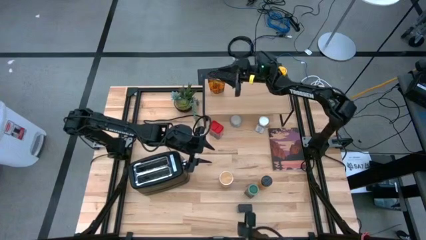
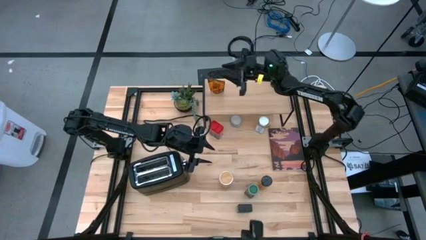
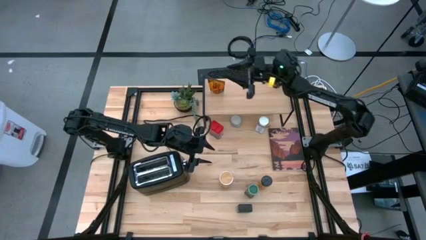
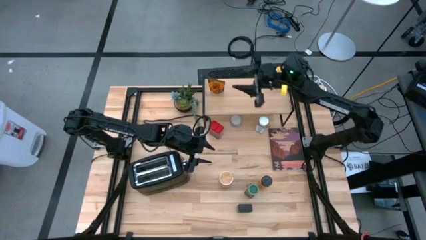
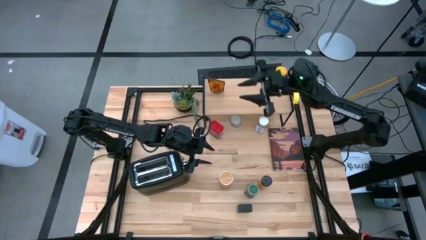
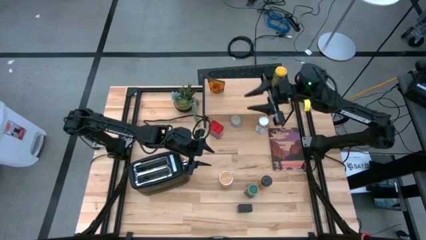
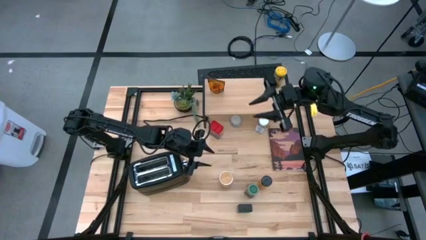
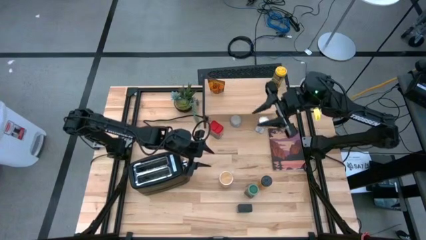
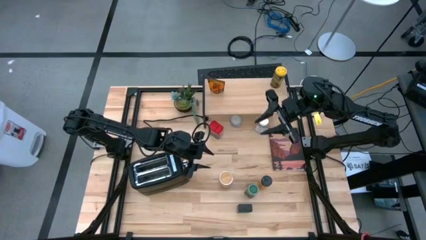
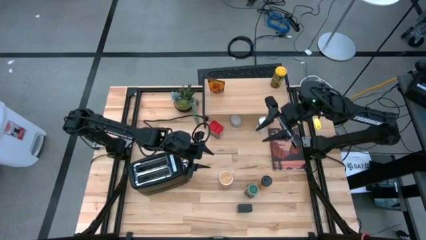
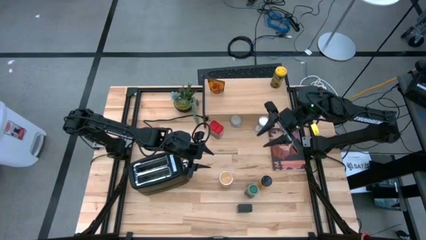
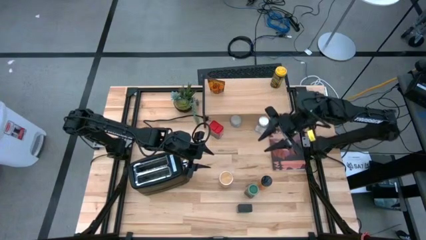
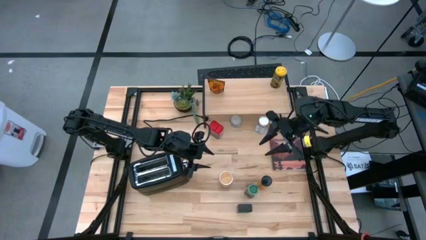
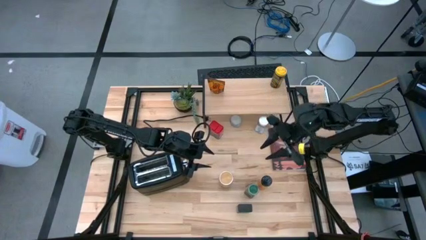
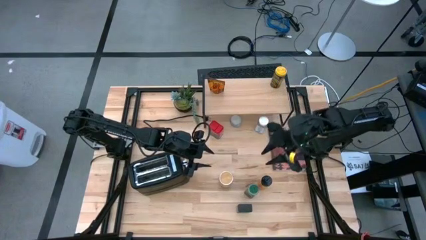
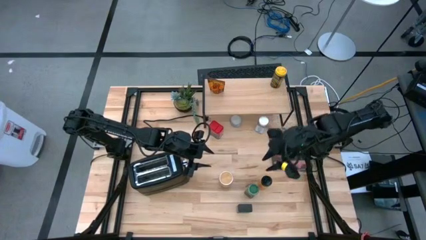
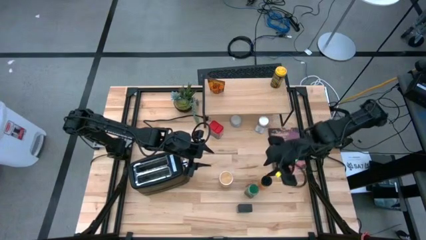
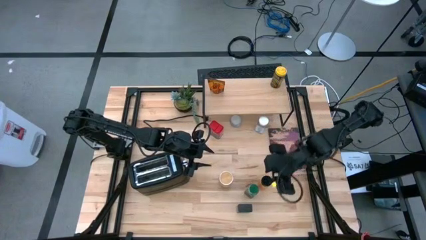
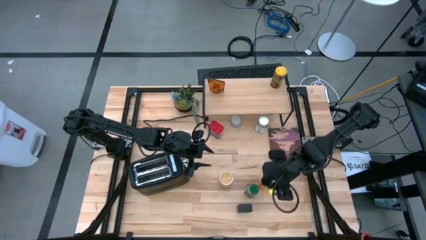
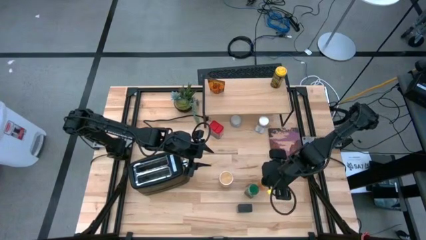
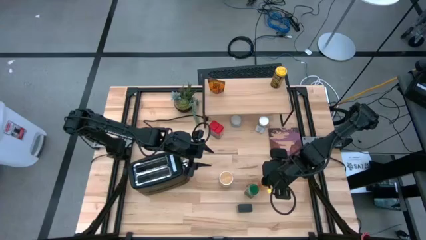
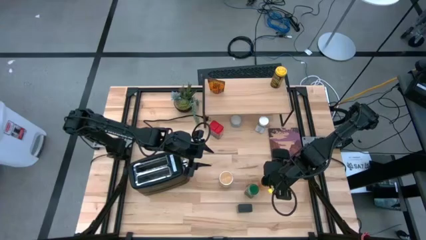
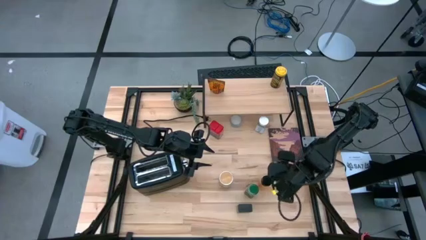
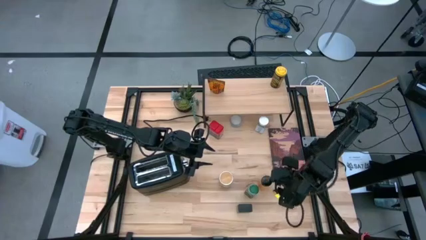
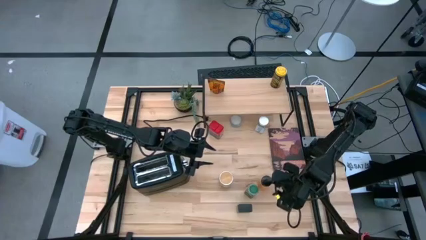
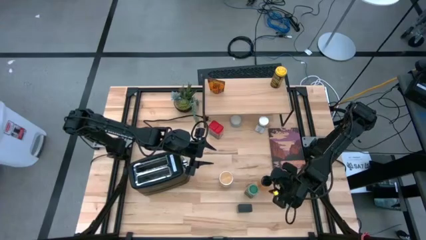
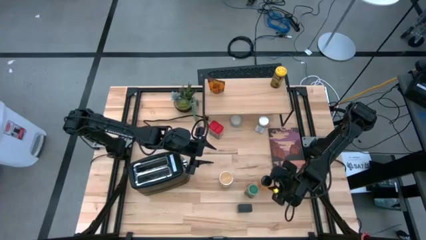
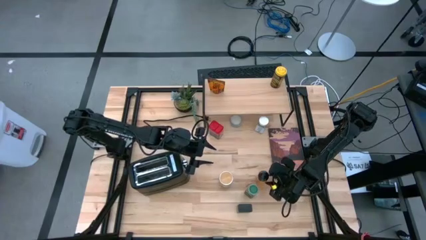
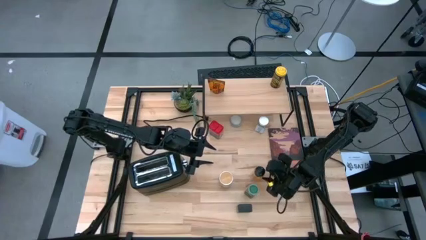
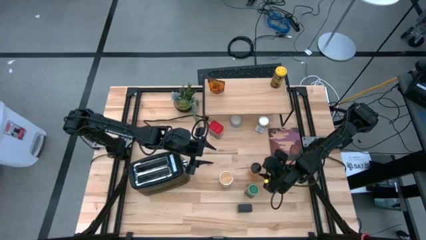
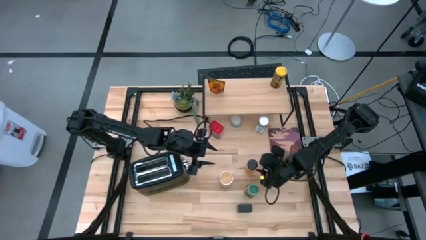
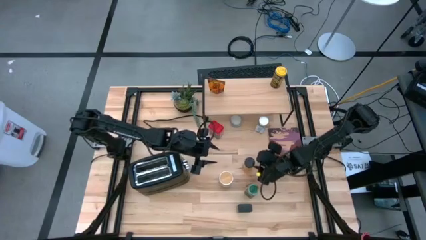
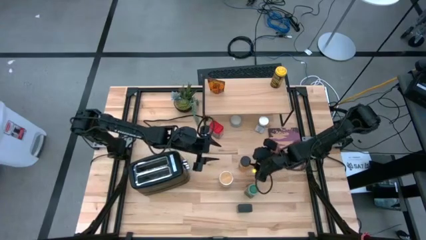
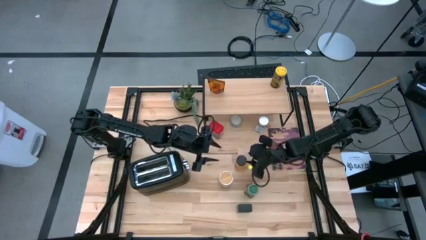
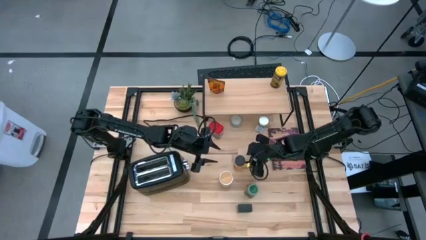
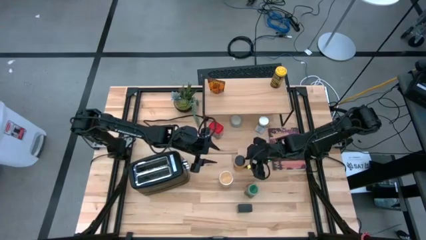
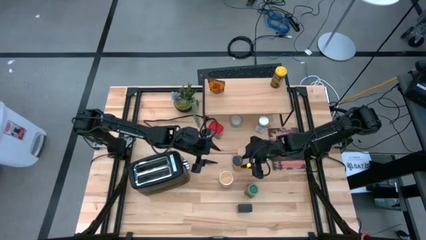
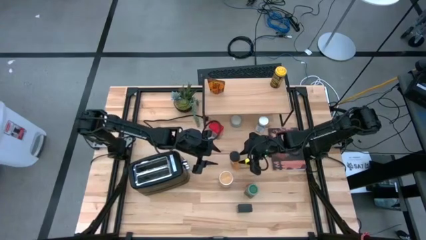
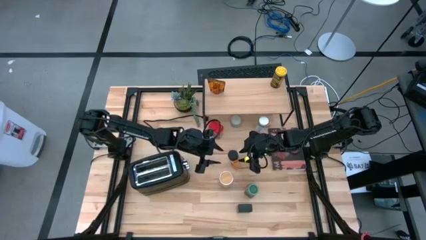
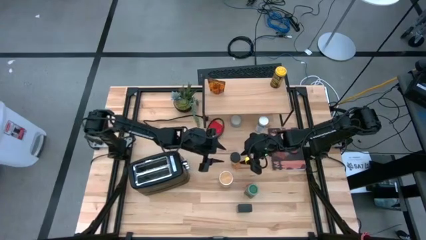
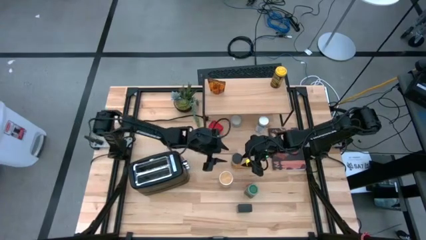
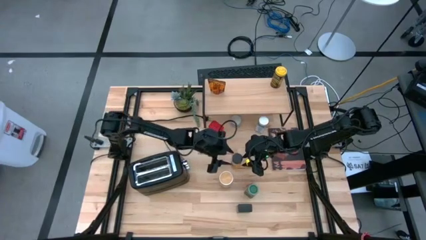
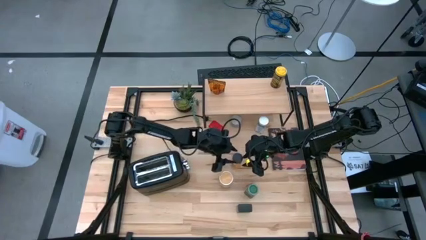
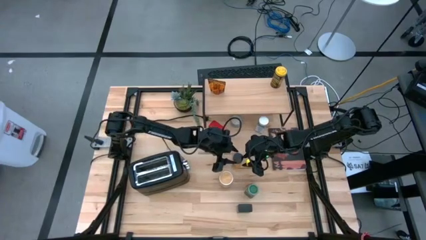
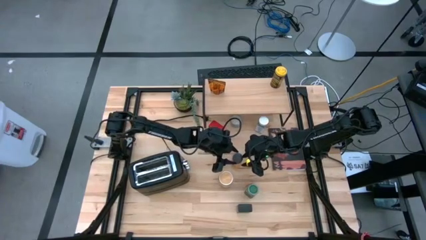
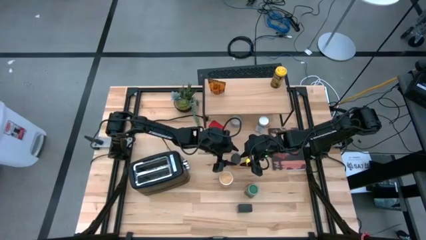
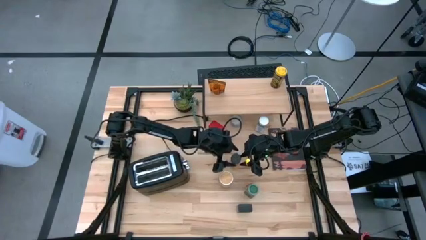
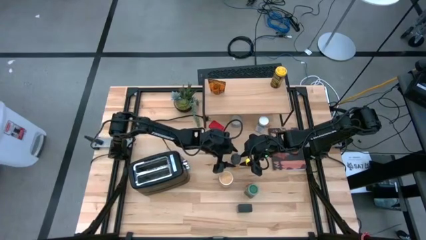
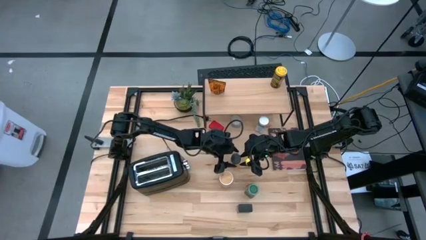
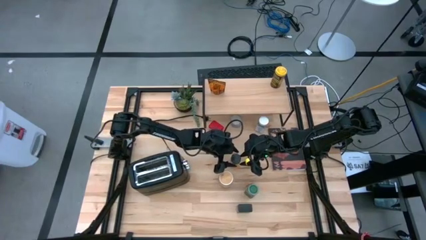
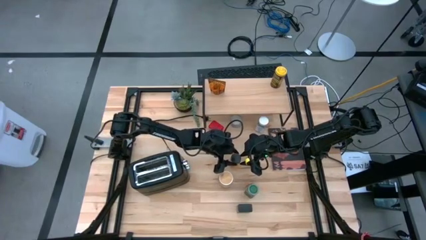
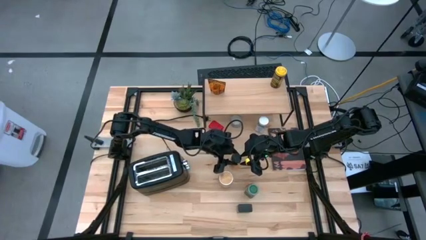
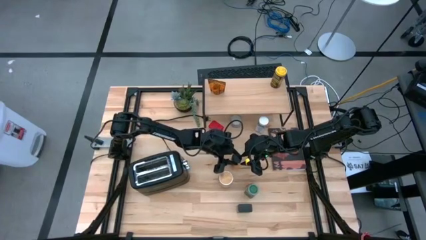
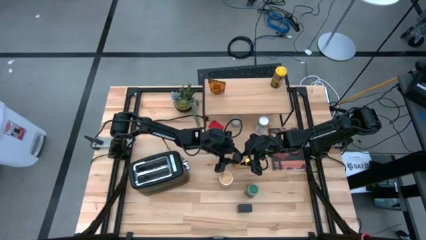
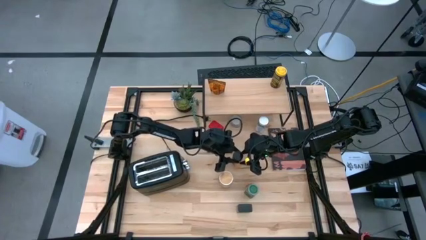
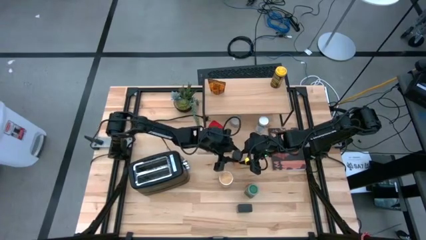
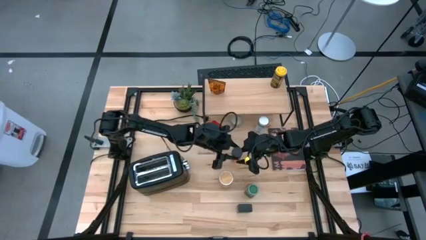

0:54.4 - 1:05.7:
Task: Shelf spices
Put the black seasoning bottle on the shelf

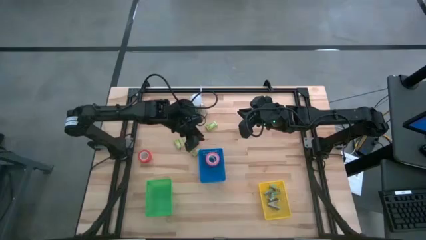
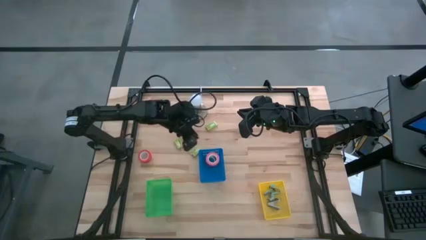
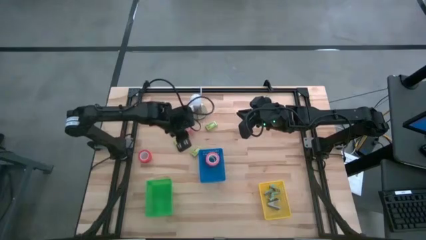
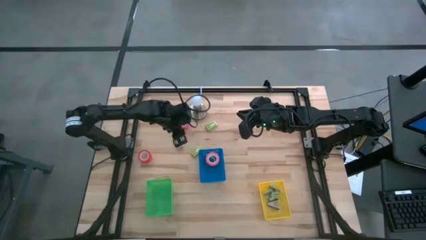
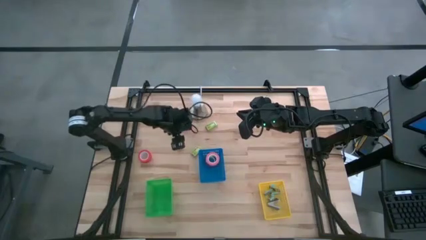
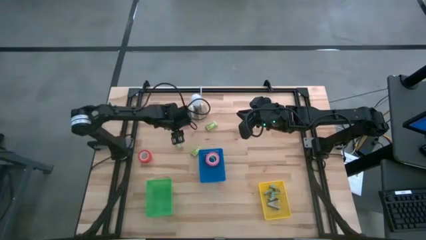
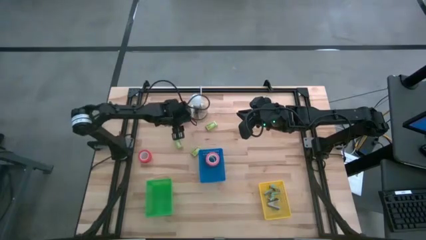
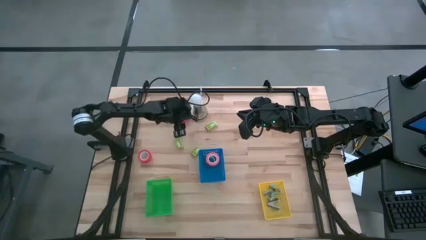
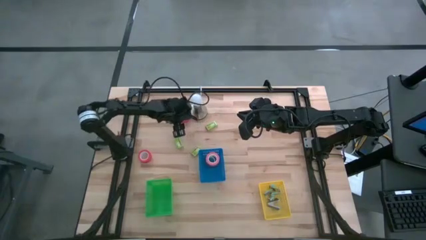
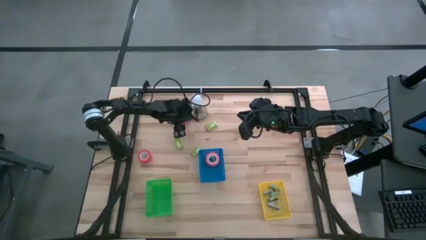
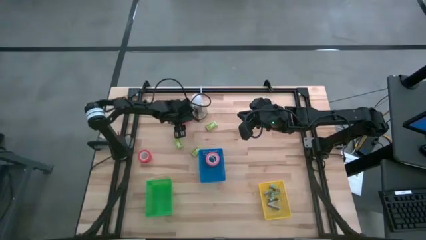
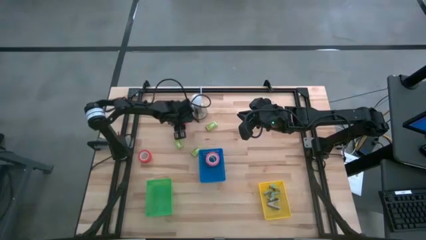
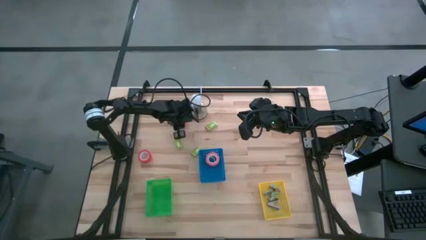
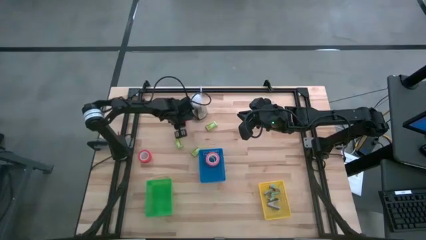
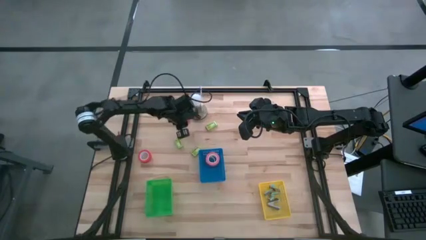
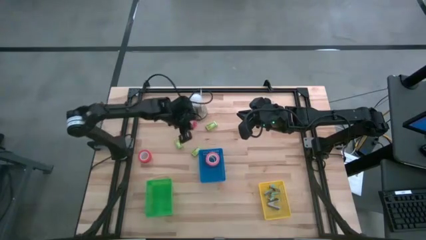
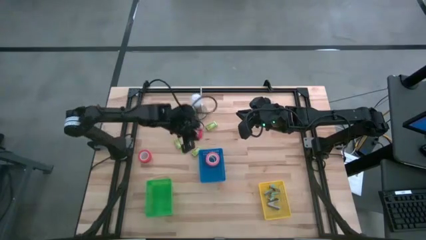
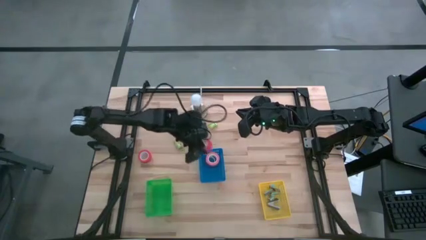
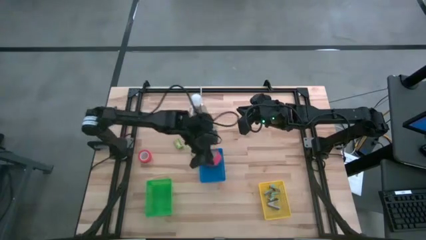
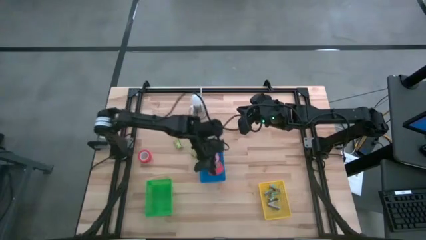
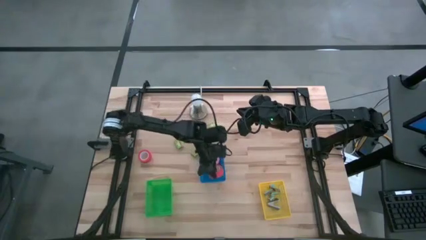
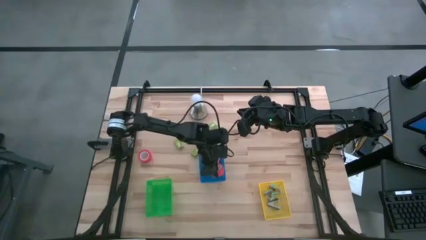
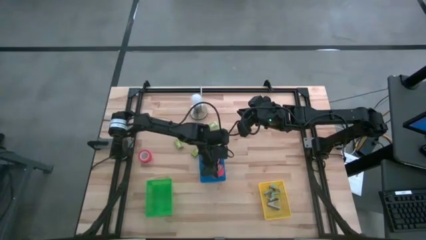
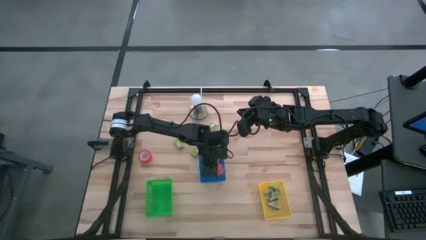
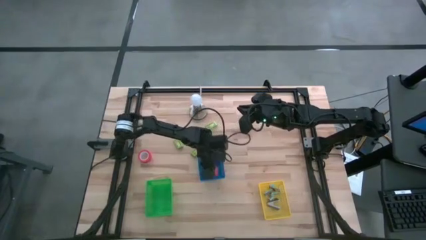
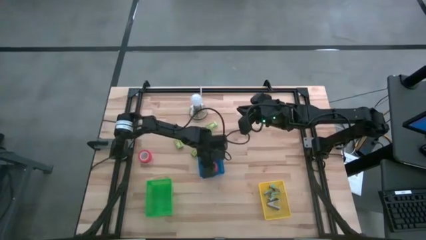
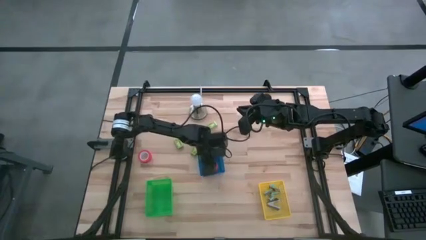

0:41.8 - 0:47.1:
Task: Pick and place Stapler, Stapler remover, tape
Put the top orange tape into the blue bin
